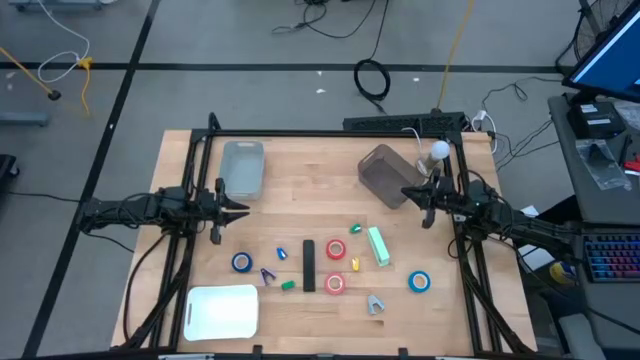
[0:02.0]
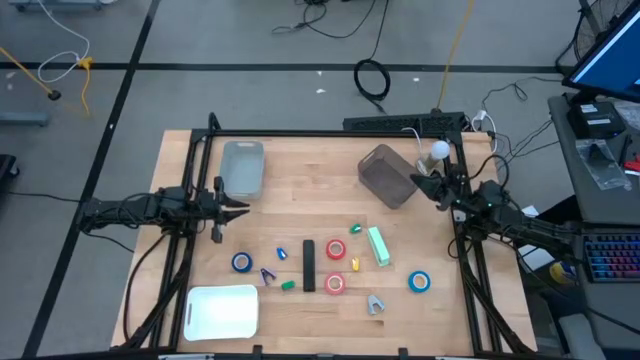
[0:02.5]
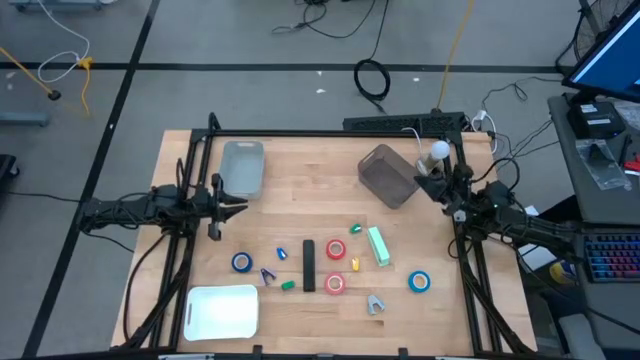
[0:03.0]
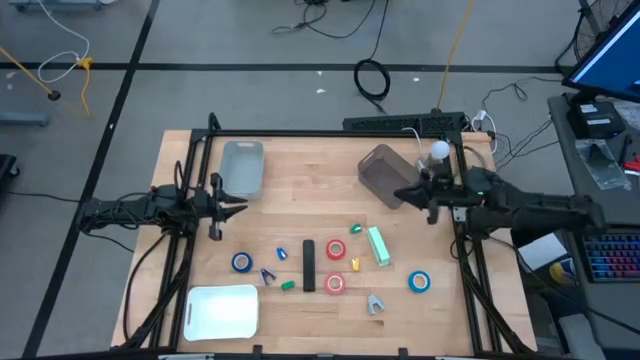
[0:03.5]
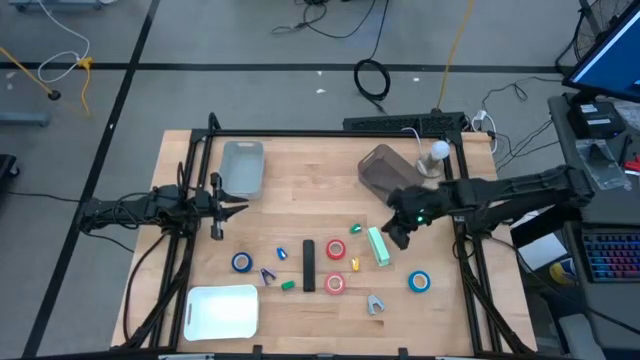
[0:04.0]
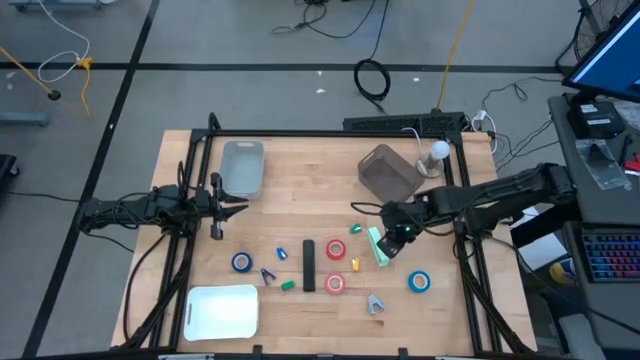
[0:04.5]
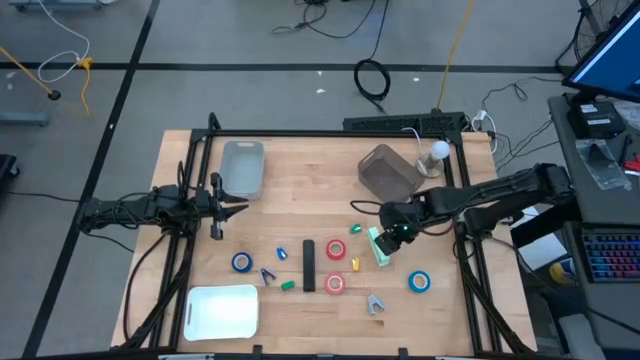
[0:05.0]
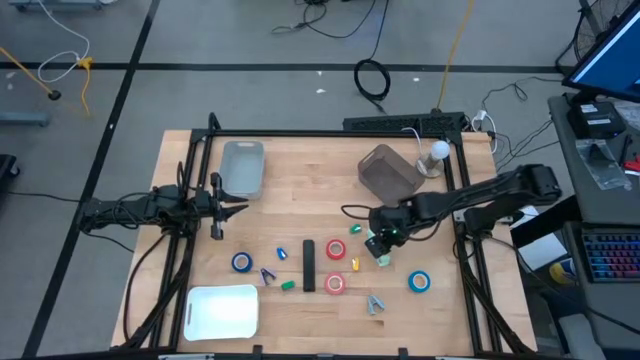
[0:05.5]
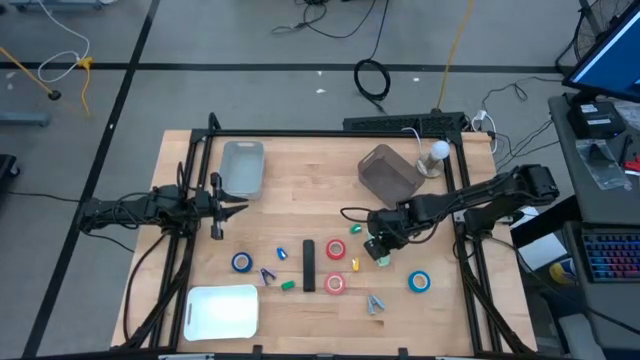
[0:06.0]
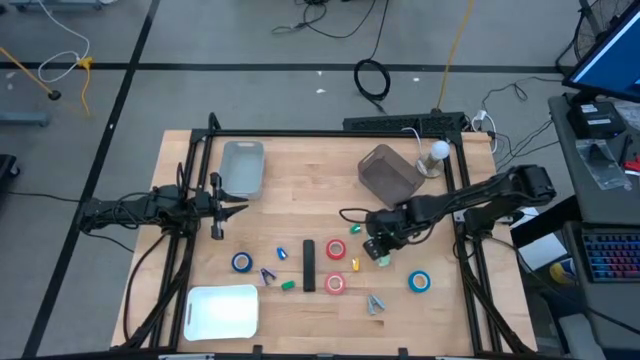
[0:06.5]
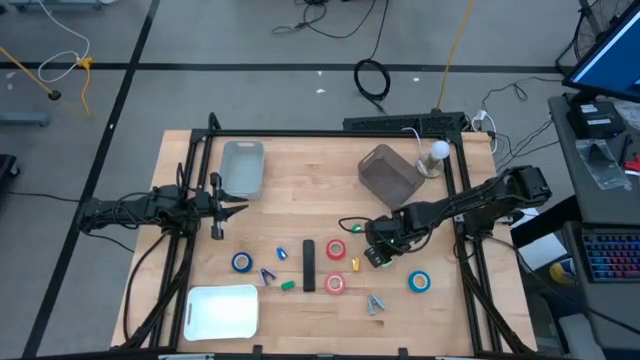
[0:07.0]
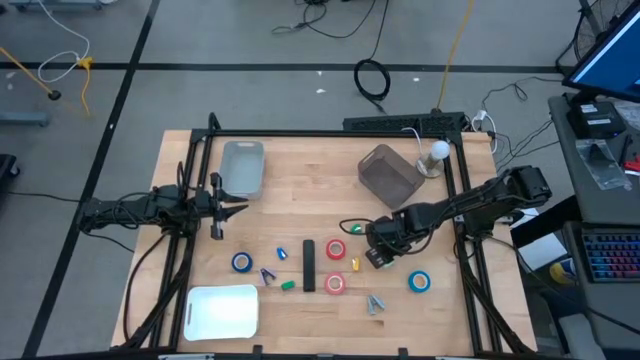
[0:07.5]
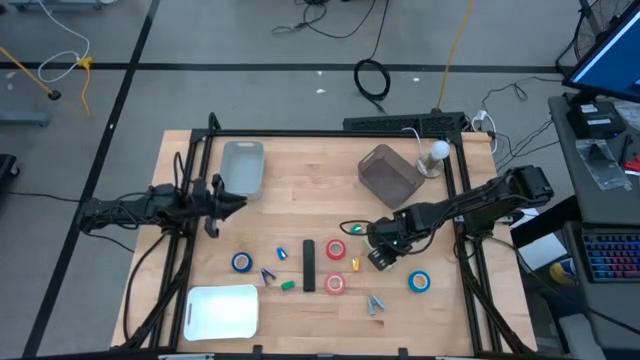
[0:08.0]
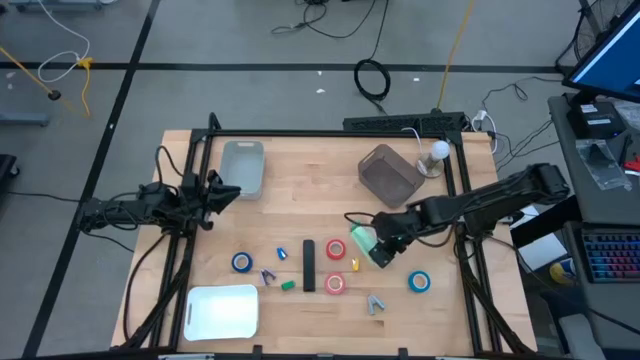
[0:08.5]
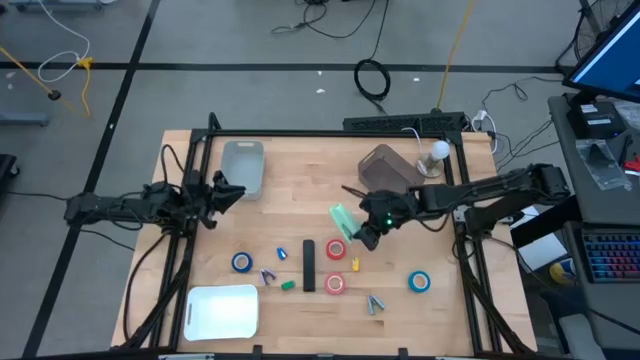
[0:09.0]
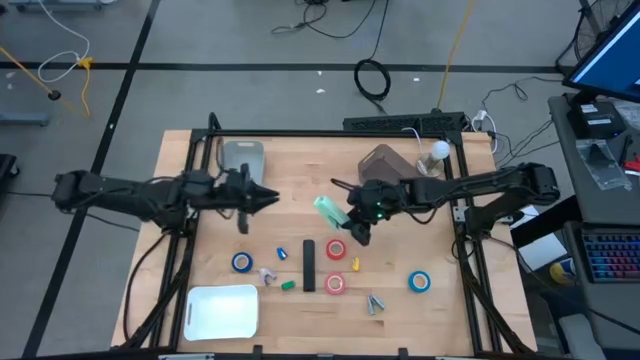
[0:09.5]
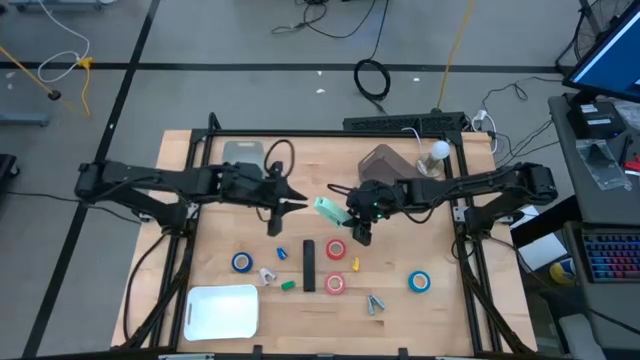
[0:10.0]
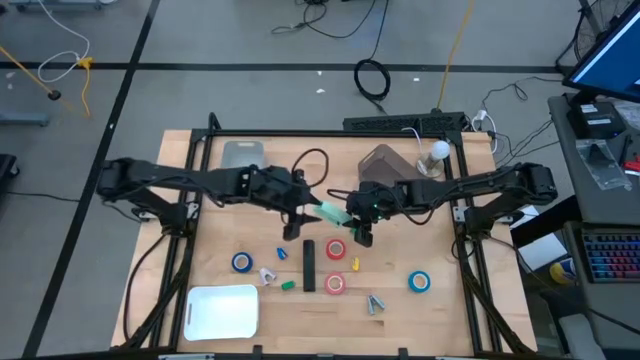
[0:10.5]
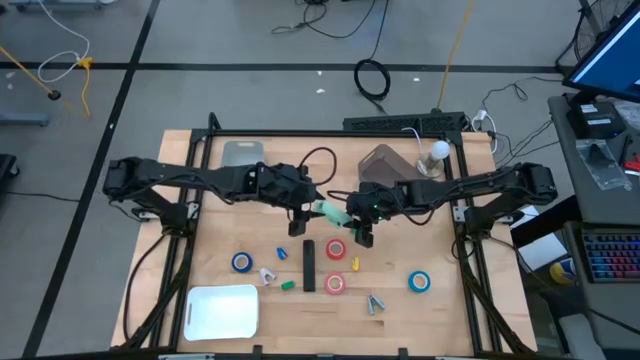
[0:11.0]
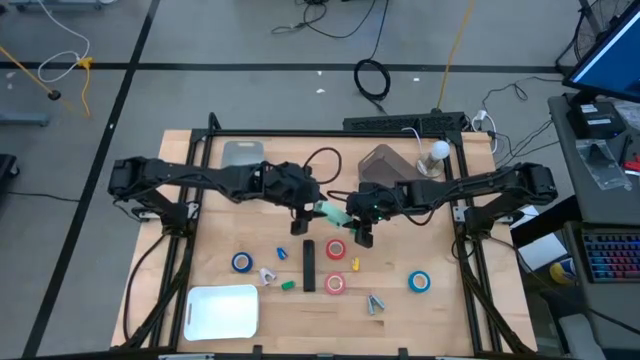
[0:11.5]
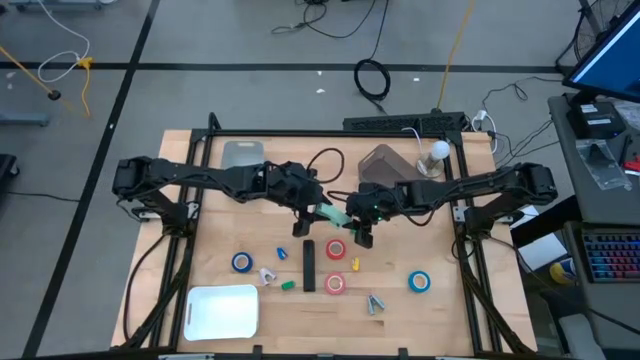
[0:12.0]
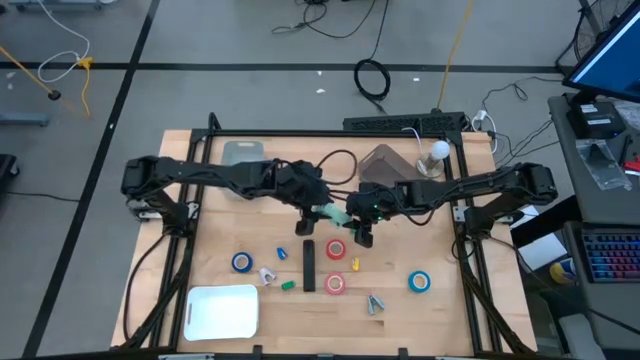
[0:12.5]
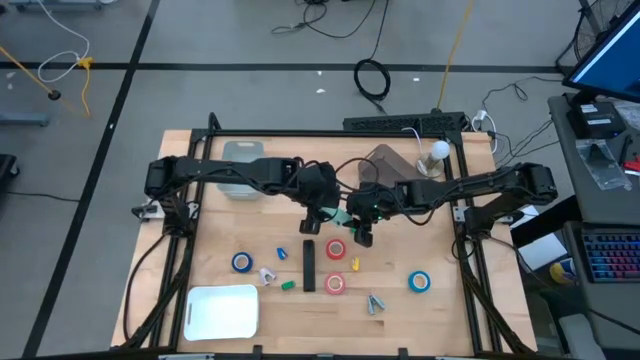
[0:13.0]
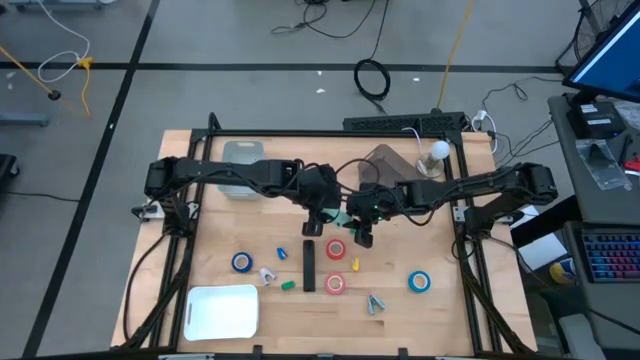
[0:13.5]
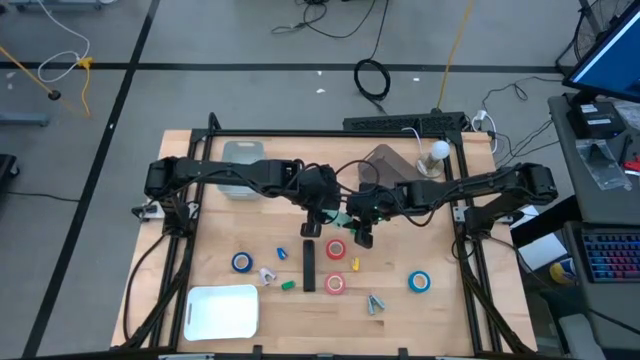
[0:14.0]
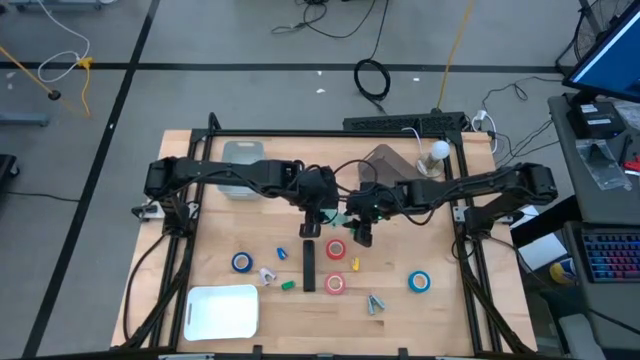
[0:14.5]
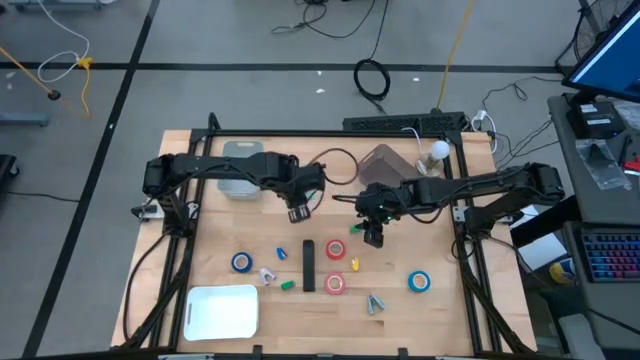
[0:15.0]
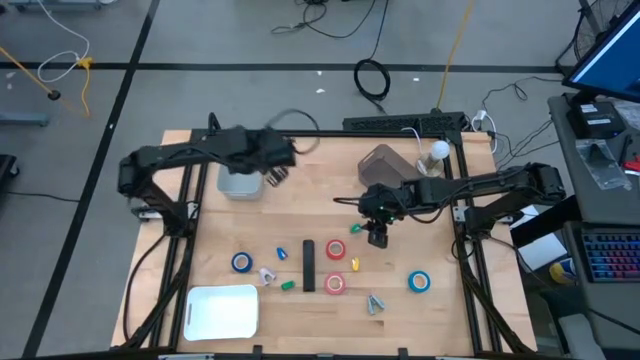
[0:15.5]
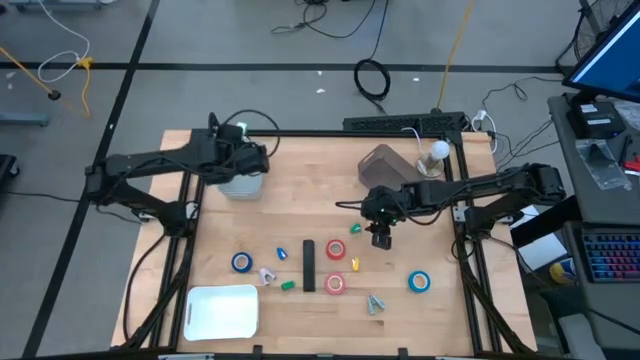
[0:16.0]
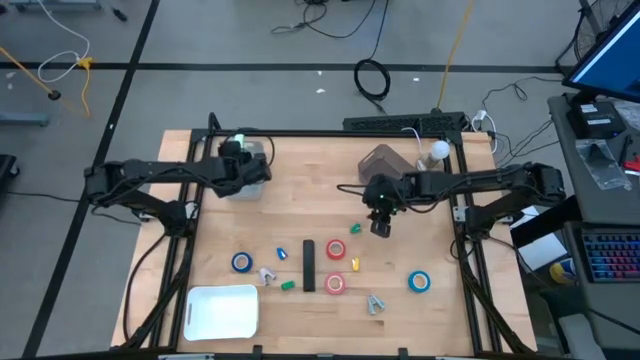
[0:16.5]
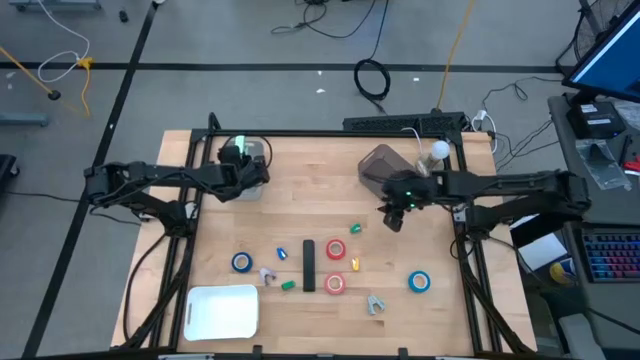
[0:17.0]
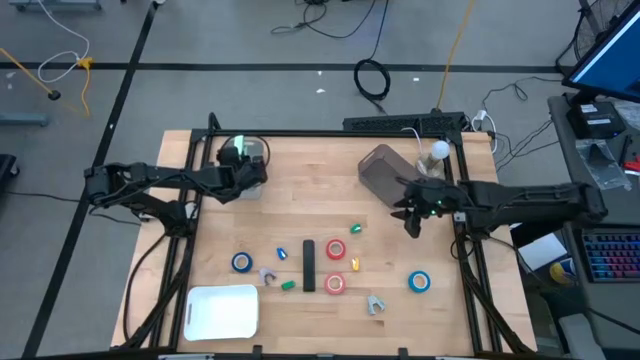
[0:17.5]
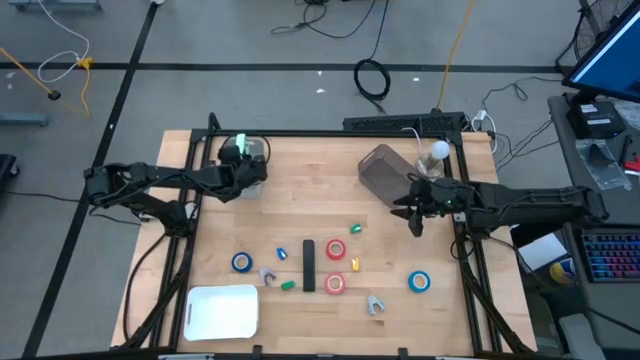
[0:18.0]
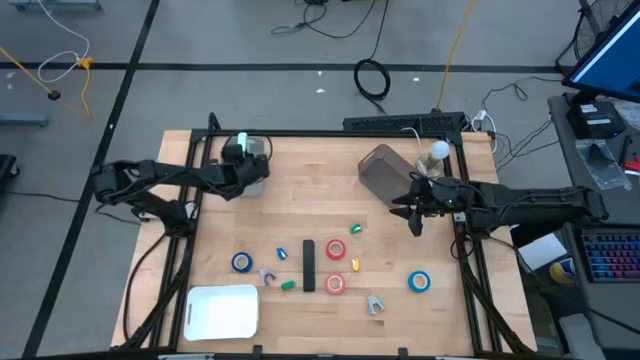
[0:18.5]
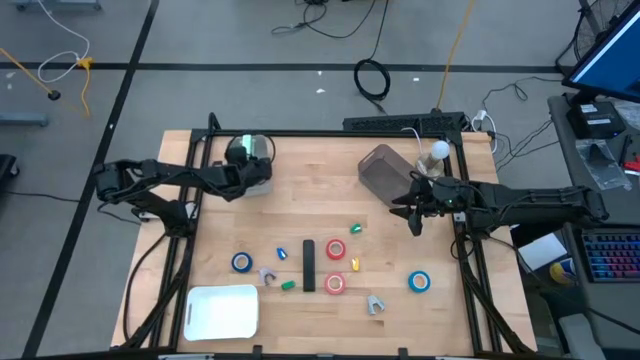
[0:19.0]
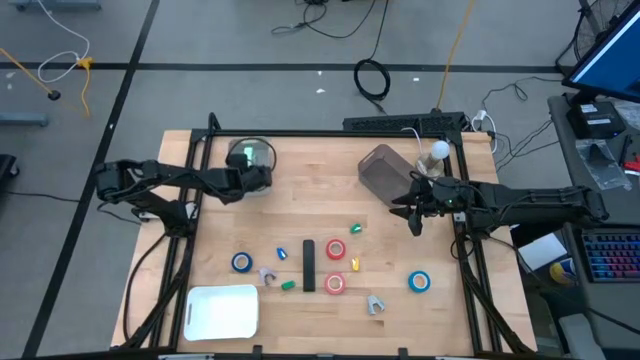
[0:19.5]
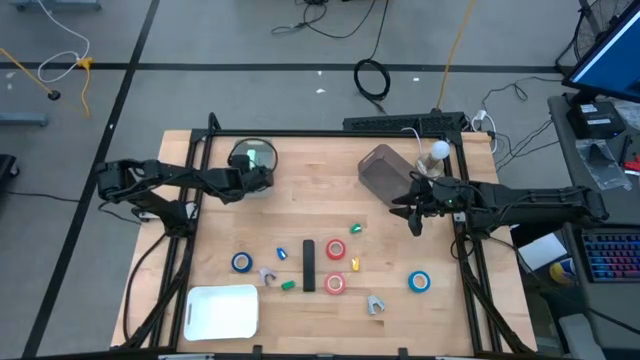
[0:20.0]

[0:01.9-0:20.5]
Task: Pick and place Stapler, Stapler remover, tape
Put the light green stapler into the gray bin
